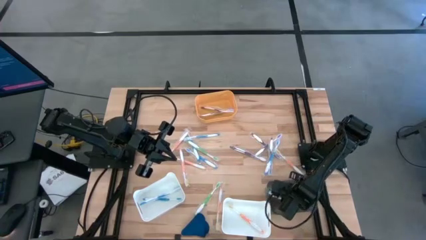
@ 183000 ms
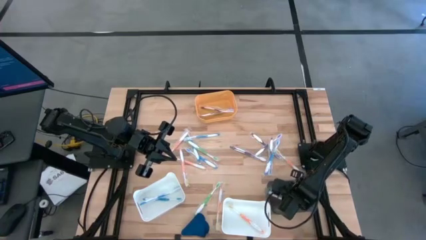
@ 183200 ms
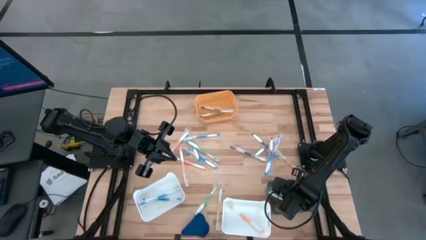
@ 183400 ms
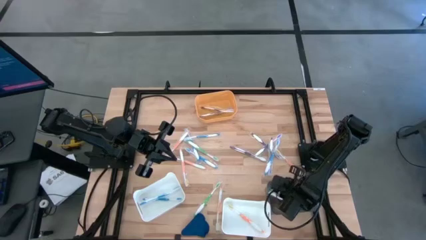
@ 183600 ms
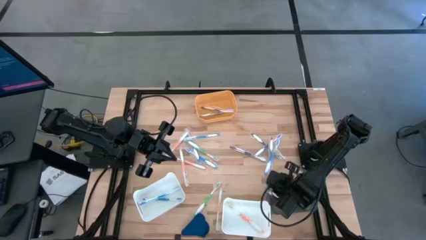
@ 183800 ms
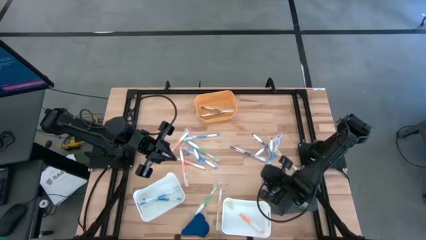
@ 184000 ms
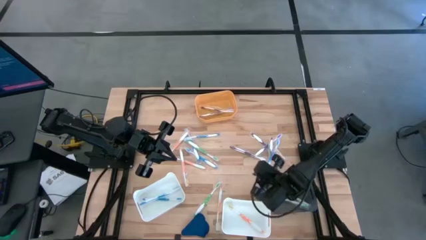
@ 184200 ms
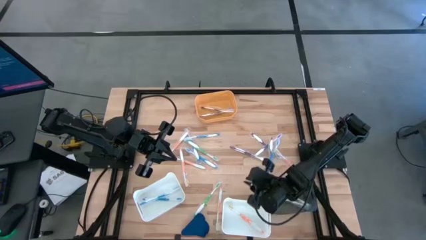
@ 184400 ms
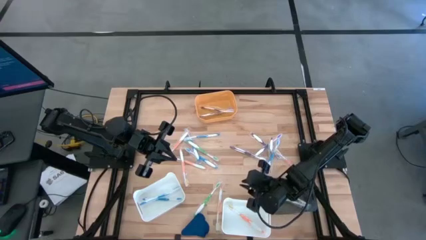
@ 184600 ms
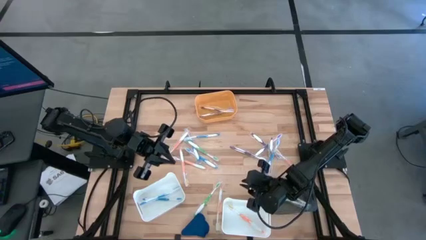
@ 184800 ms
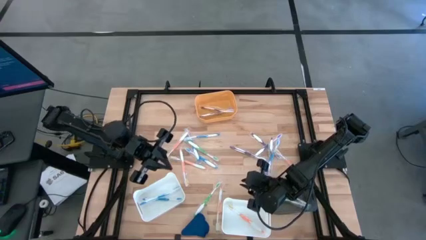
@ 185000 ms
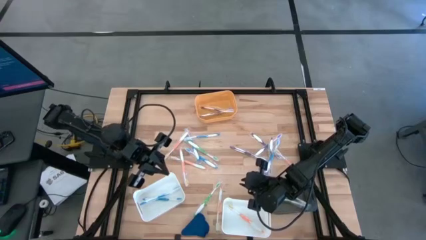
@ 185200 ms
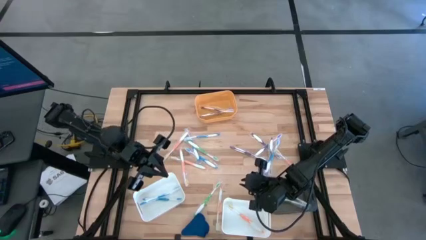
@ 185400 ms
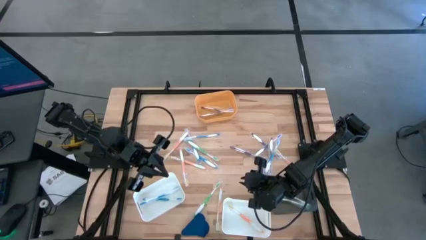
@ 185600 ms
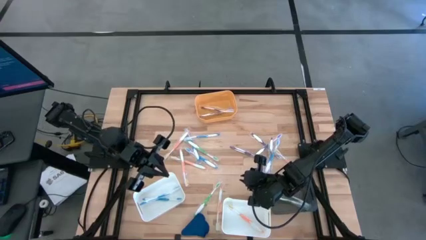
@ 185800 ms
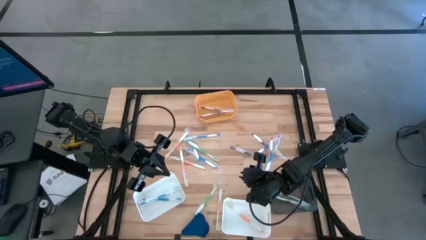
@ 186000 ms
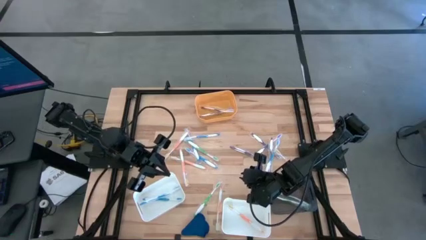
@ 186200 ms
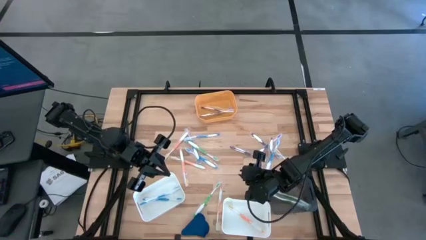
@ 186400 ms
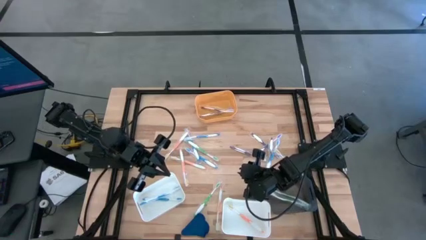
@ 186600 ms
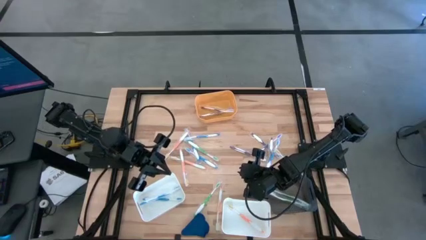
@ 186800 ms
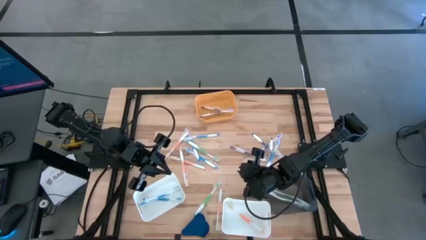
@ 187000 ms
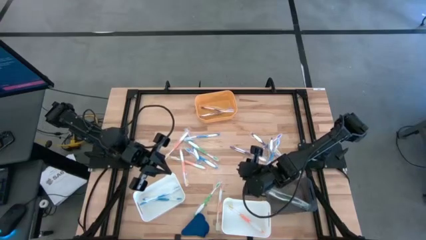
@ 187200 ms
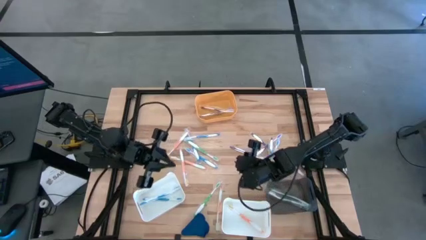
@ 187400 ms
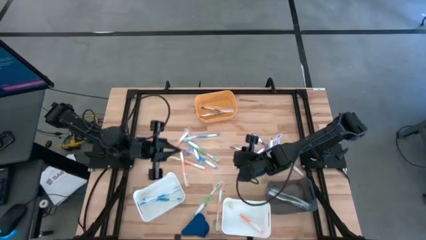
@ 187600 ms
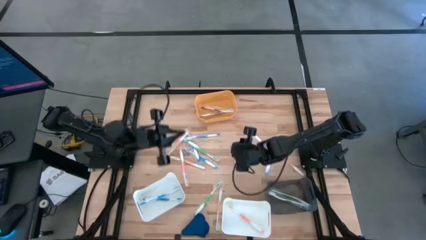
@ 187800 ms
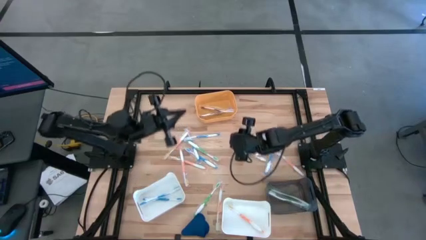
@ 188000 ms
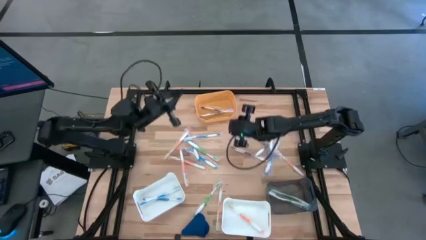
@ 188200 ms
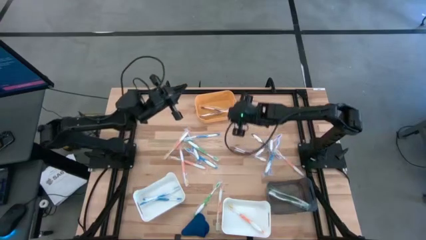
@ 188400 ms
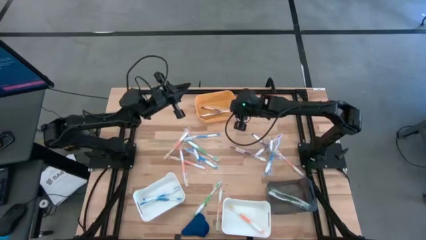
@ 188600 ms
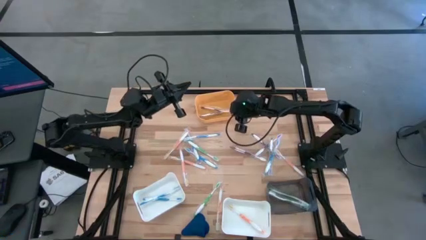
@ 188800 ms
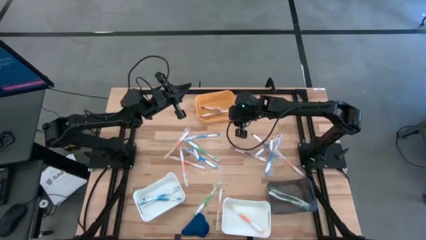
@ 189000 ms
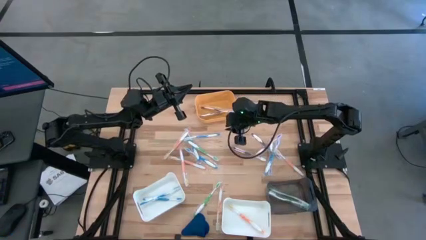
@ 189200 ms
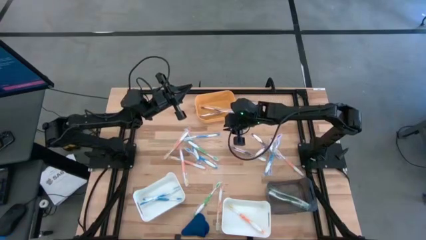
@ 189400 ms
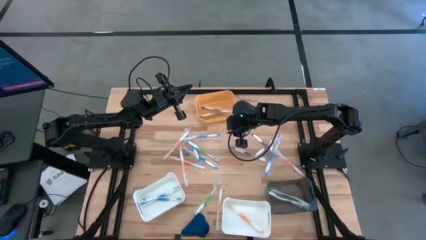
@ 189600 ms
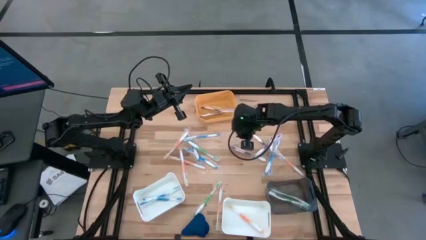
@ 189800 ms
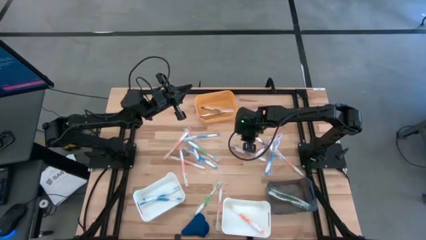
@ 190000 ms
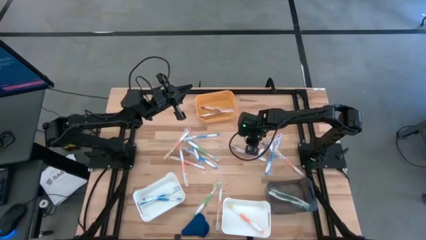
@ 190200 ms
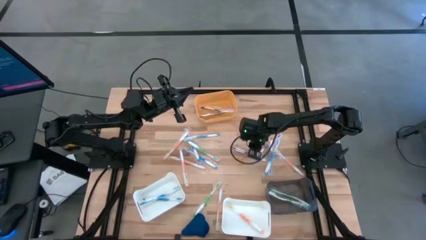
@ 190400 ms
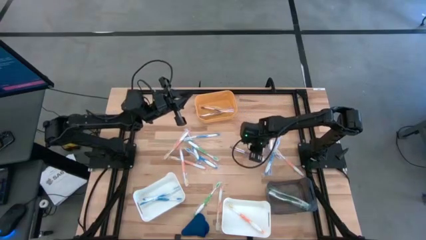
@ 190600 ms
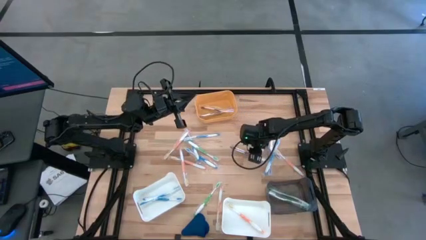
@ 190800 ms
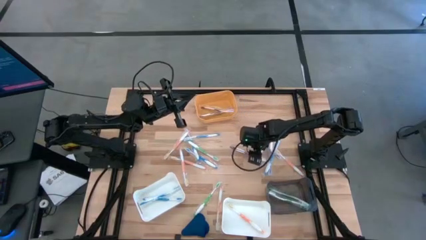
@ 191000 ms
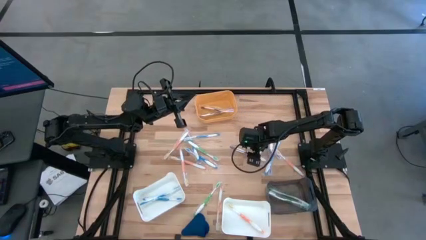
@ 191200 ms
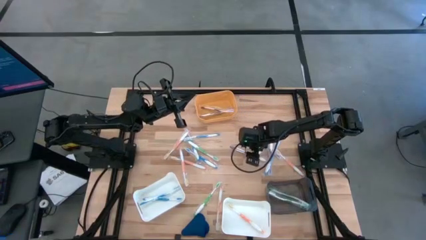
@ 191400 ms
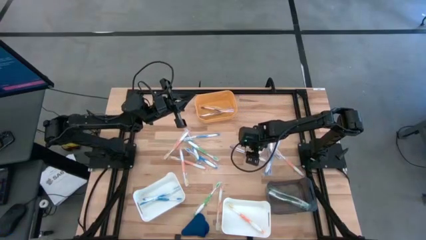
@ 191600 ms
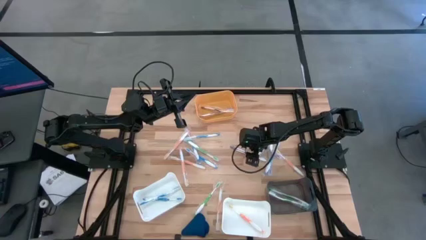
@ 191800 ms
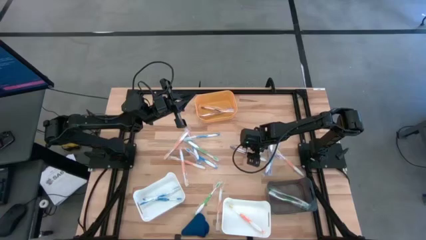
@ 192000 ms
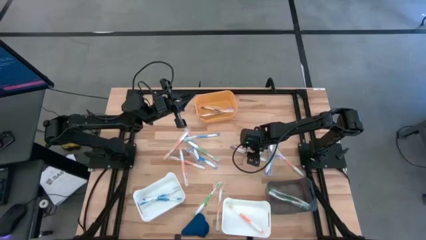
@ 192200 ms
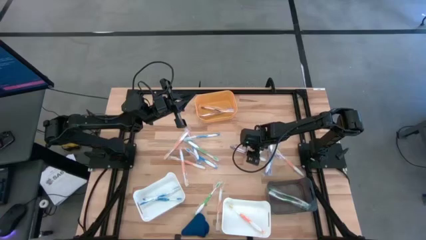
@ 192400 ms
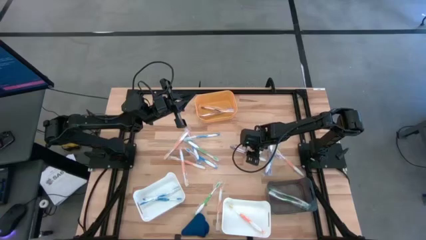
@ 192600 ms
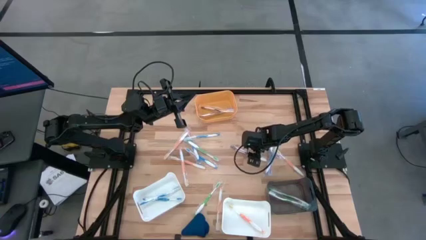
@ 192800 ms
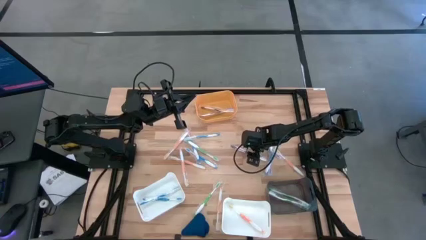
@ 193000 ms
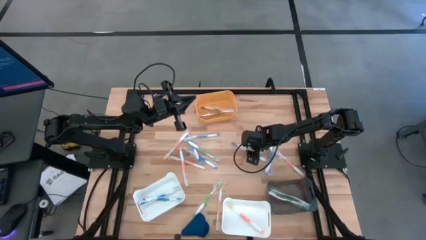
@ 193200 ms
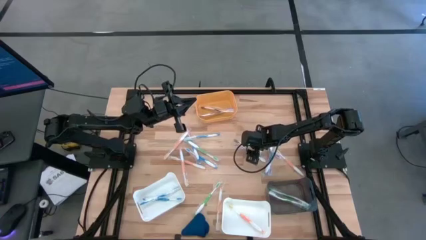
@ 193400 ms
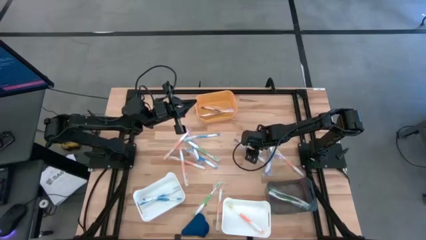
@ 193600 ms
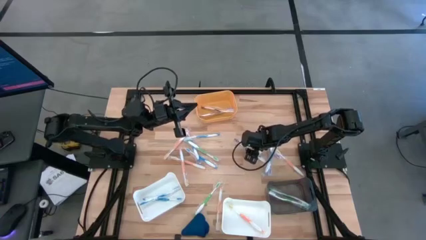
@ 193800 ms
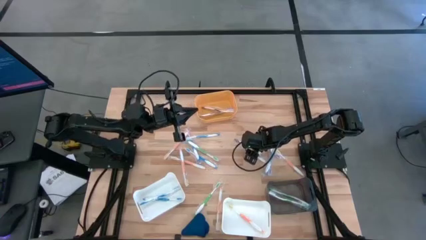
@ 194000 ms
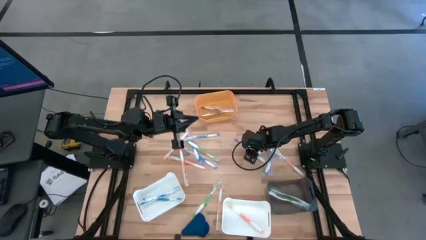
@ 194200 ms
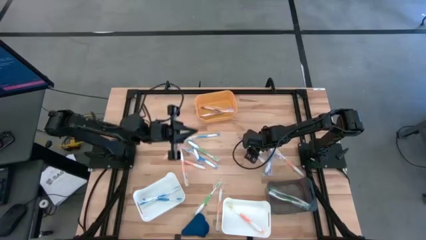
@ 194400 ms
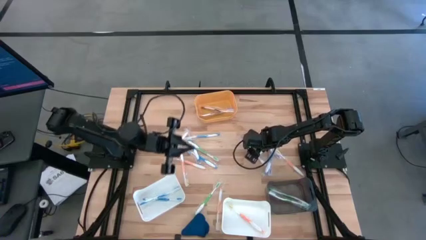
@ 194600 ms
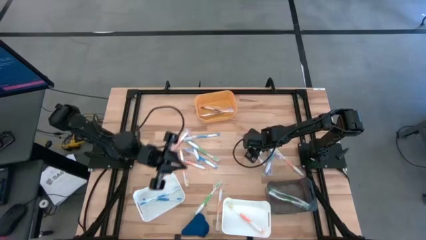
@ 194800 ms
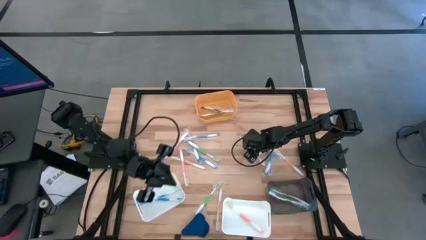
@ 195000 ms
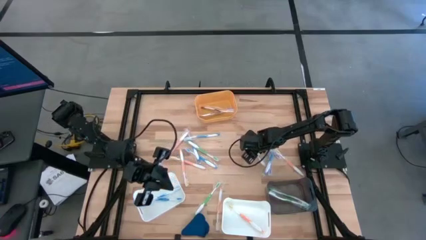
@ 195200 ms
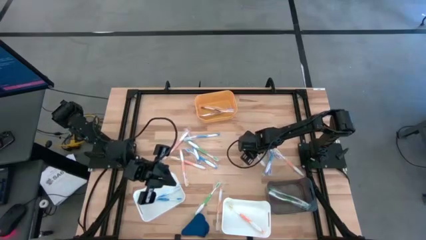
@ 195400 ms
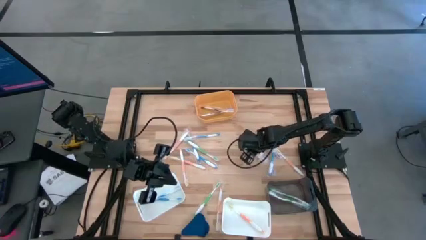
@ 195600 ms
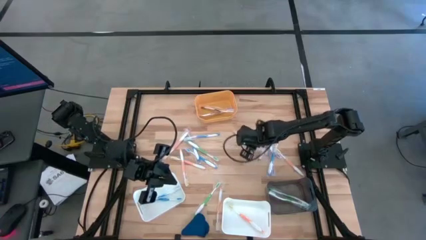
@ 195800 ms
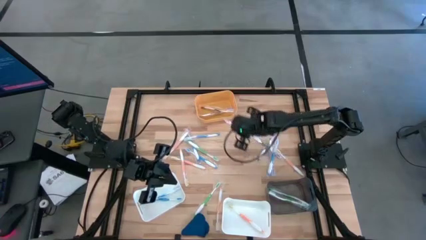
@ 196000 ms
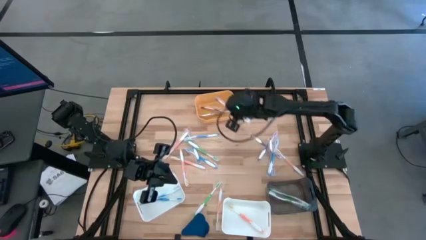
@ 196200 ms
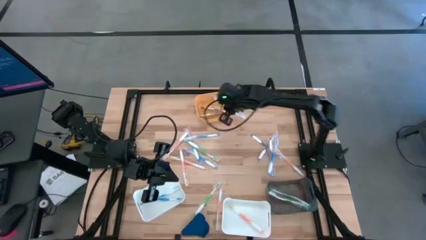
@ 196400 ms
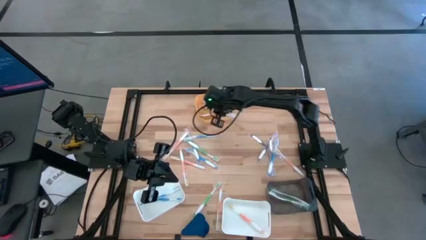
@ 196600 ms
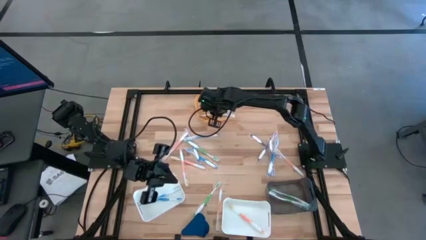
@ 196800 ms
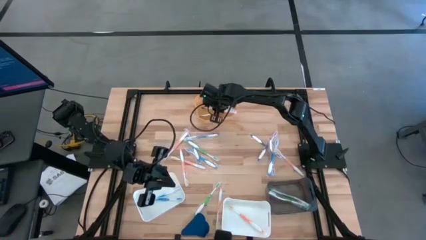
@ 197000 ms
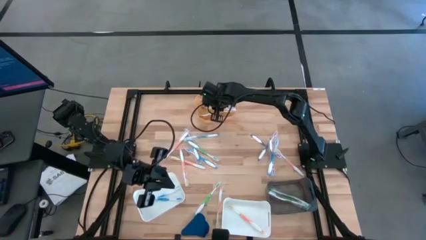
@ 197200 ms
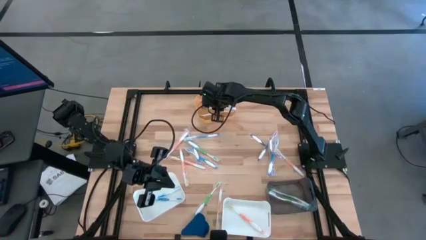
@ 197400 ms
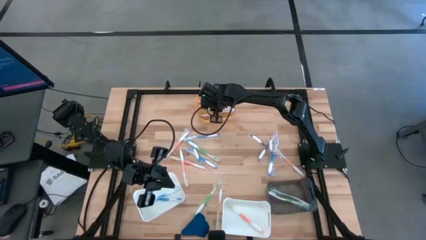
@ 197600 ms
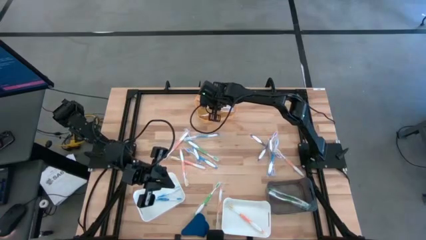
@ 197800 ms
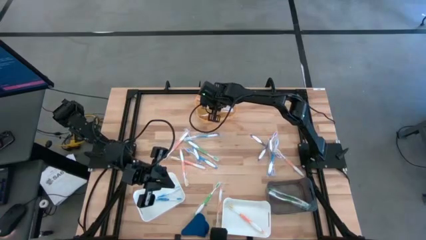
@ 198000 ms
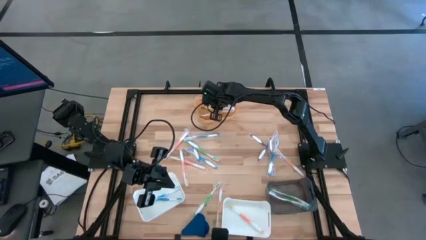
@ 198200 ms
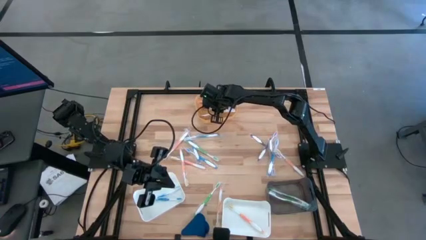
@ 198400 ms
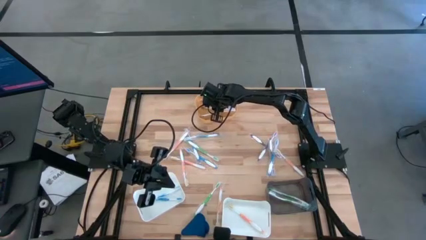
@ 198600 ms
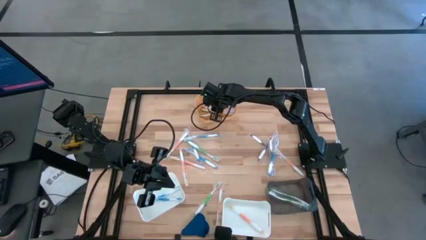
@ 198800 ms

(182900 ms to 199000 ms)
Task: Pick & Place Toothbrushes
Put the purple toothbrush into the yellow bin
